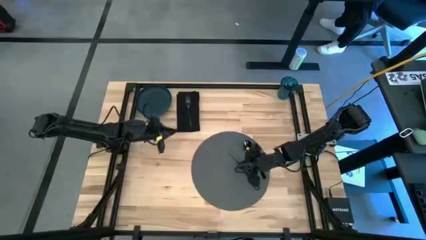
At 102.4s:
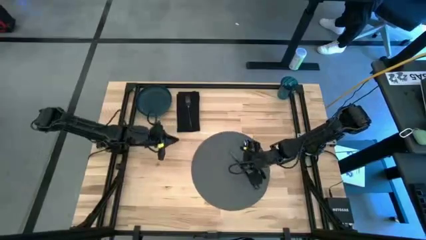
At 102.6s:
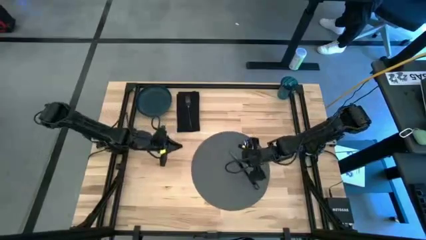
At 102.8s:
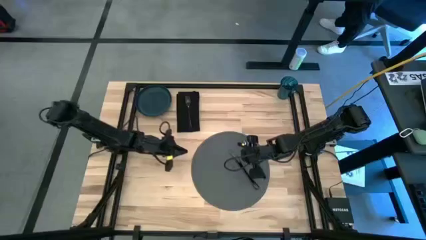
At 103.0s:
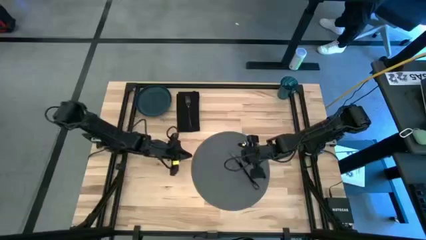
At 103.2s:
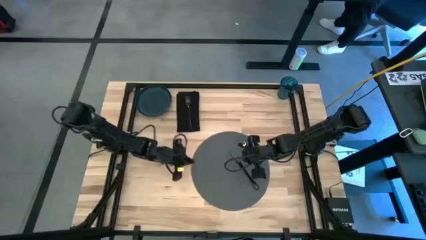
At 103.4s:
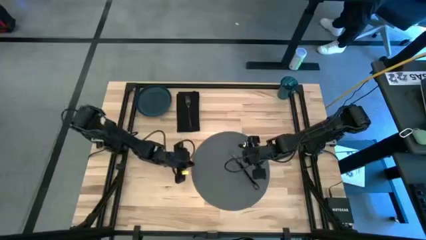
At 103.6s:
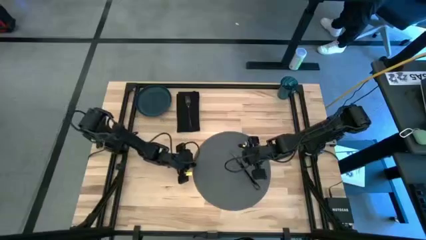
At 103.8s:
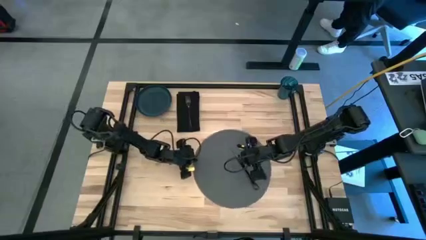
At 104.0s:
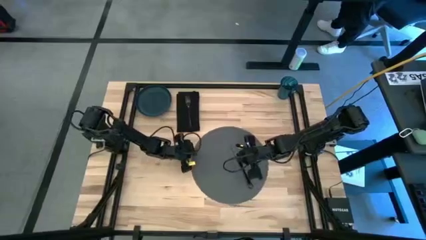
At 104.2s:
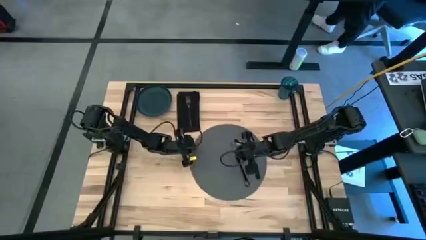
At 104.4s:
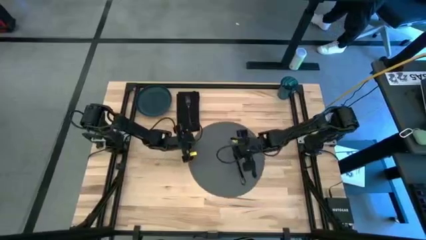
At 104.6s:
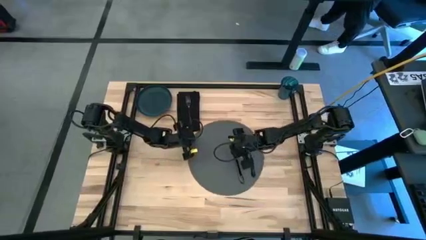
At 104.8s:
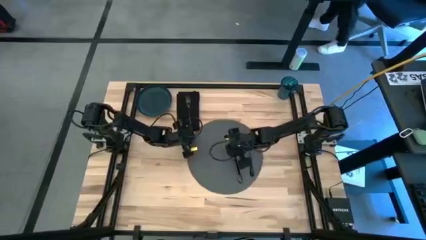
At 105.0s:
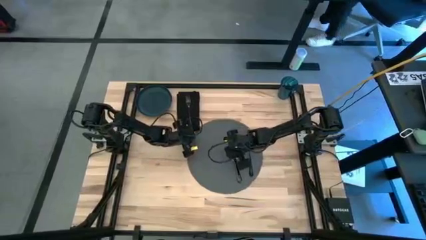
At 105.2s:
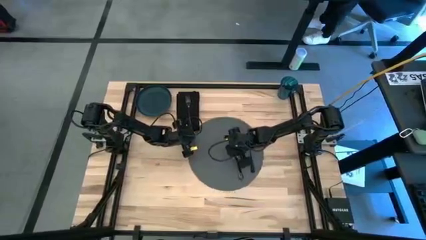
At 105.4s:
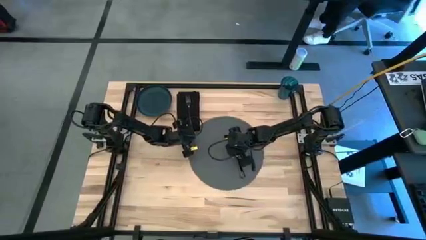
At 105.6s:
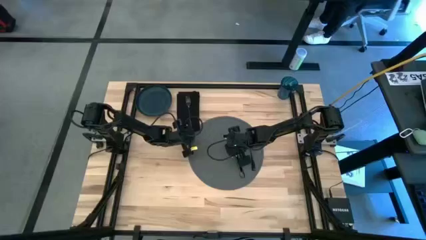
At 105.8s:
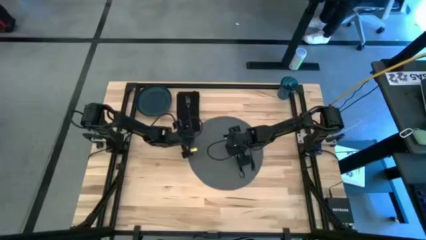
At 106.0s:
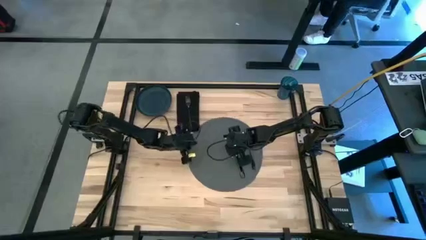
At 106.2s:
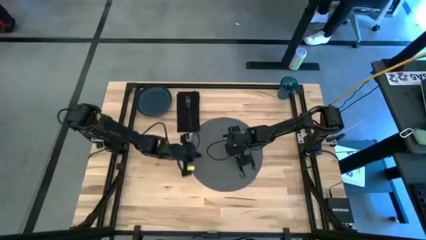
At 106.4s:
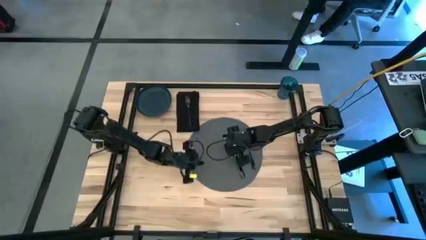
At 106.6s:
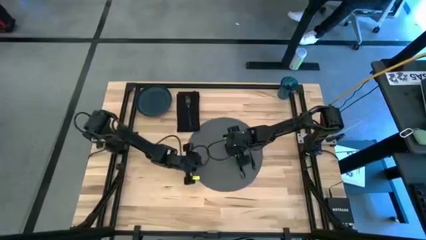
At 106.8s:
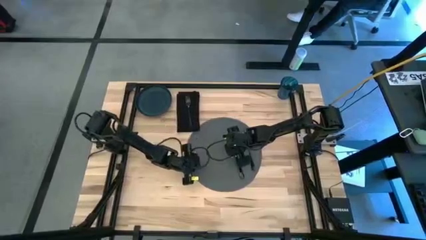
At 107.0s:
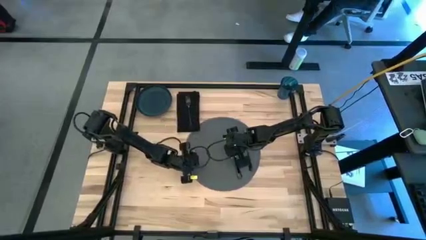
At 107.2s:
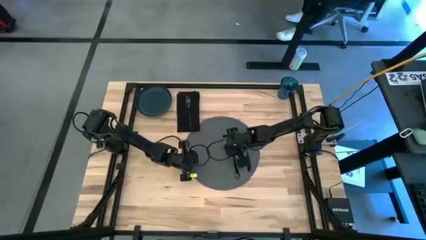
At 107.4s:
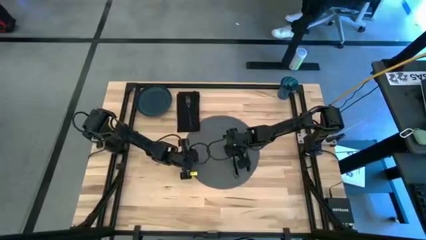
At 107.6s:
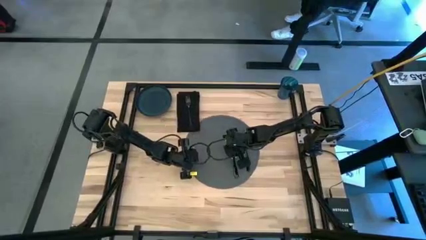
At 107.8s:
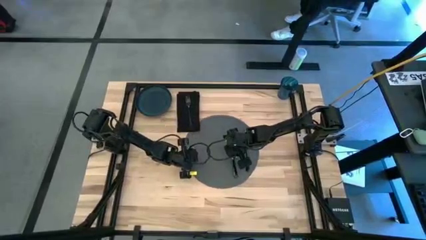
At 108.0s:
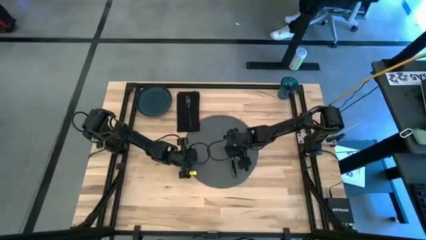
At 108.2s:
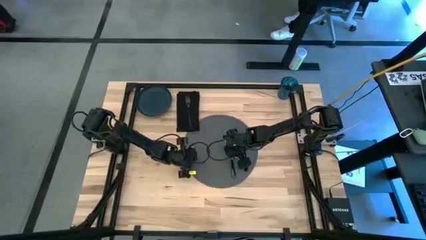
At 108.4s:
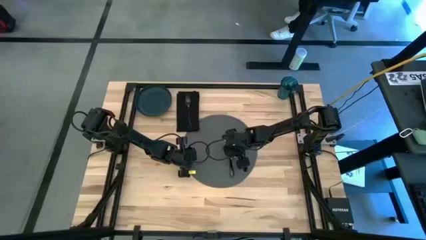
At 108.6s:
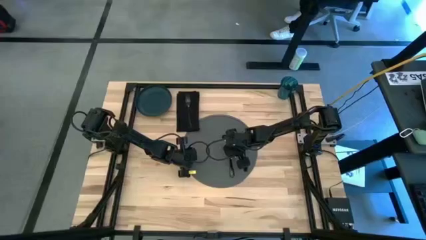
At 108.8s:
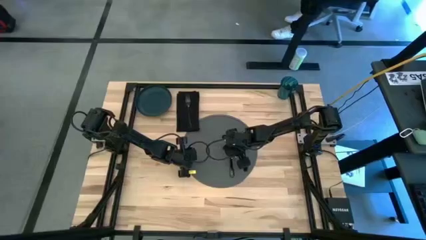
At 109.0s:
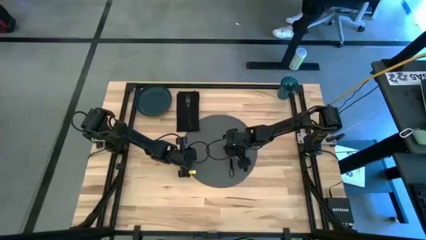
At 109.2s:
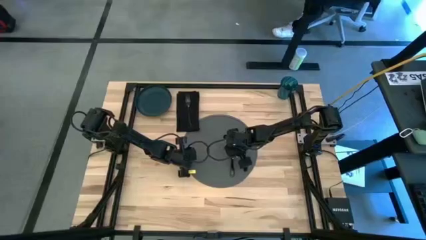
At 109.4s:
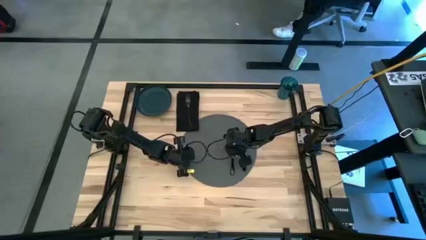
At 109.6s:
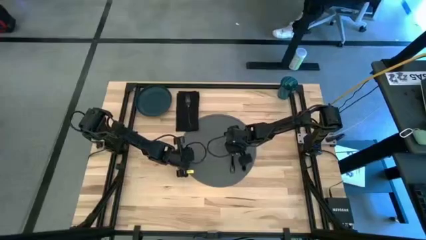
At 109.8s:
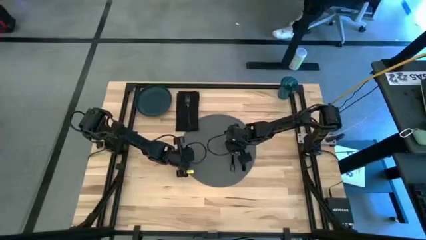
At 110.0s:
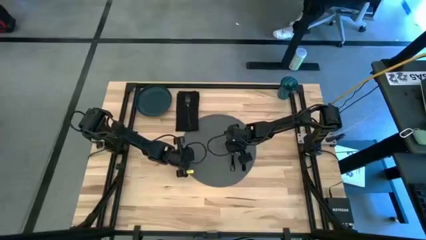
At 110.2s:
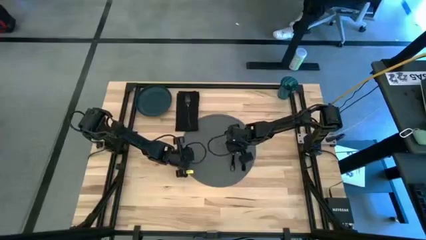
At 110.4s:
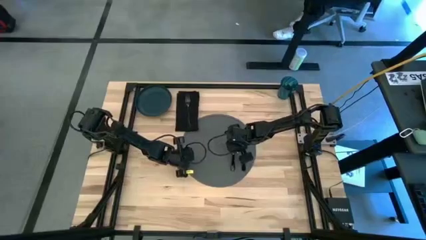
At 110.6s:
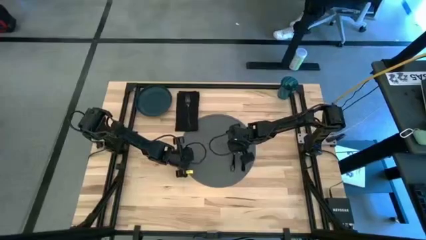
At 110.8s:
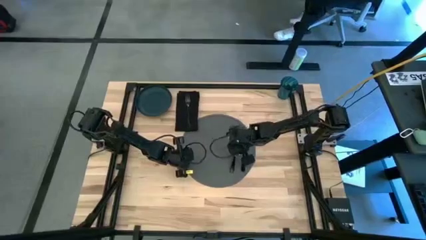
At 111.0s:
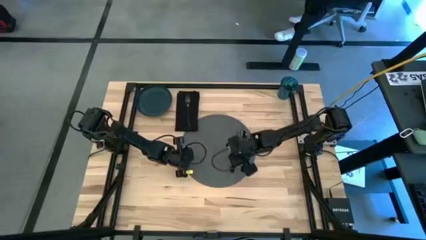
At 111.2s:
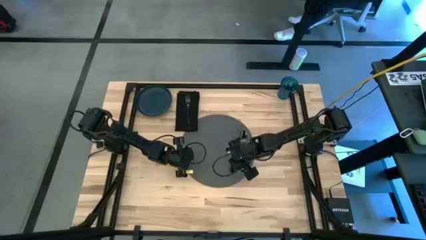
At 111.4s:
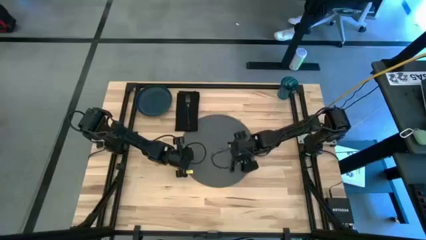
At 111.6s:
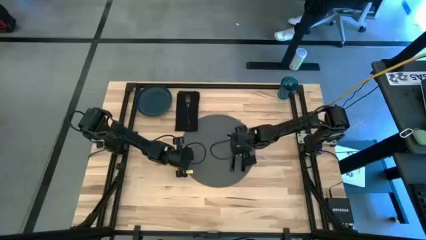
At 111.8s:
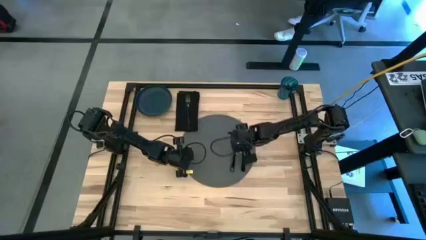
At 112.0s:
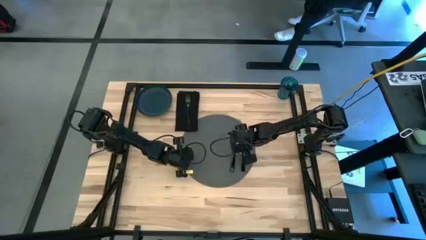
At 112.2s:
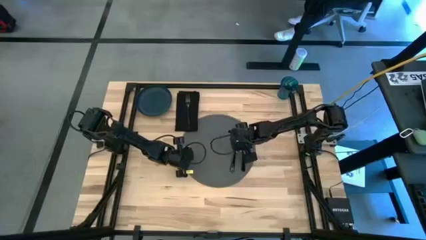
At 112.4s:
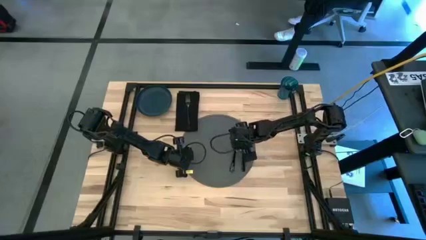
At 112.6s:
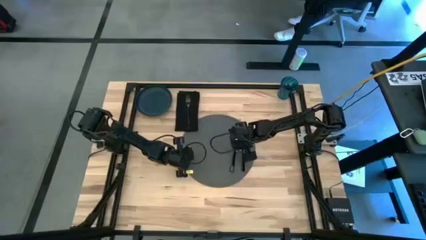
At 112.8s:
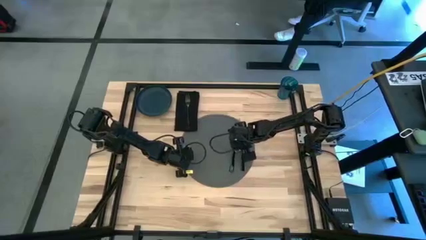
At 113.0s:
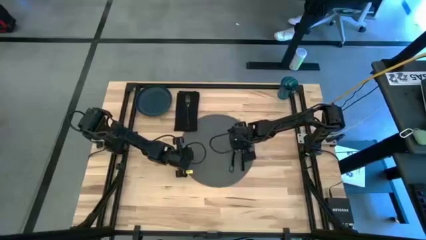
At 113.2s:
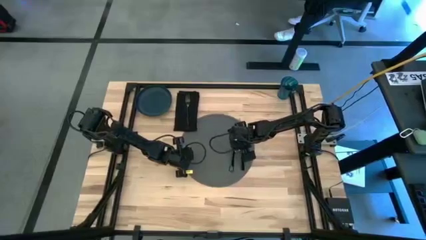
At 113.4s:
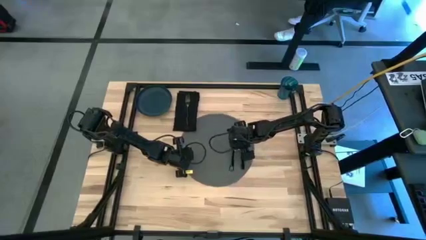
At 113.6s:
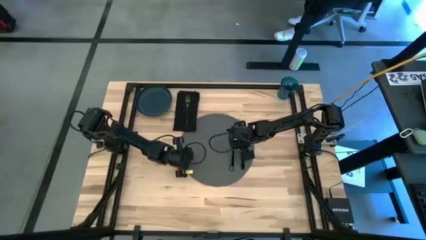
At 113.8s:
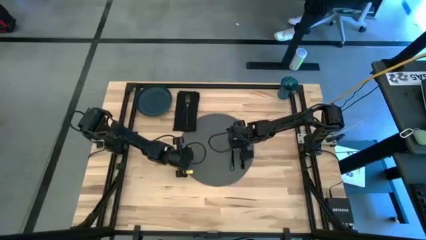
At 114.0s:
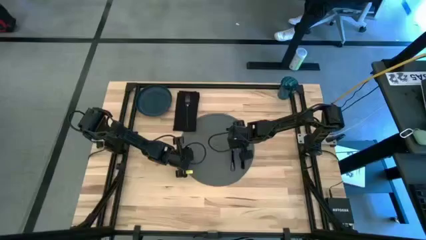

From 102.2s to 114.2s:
Task: Set table place
Put the black table knife on the gray tablemat to the left of the black spoon

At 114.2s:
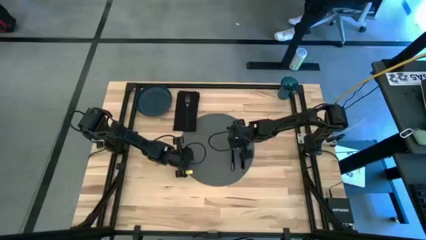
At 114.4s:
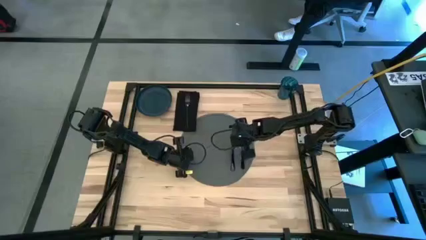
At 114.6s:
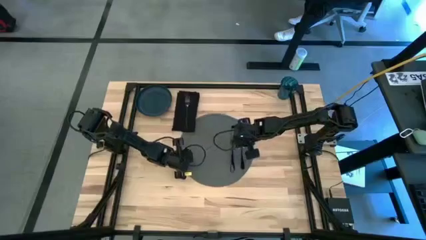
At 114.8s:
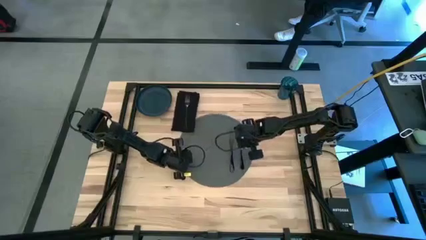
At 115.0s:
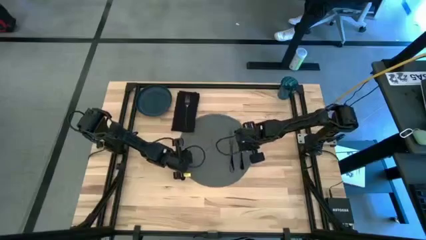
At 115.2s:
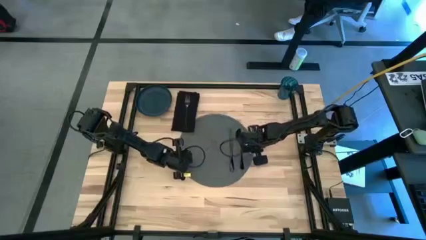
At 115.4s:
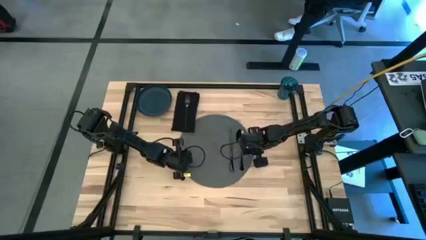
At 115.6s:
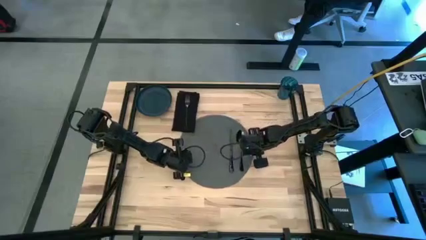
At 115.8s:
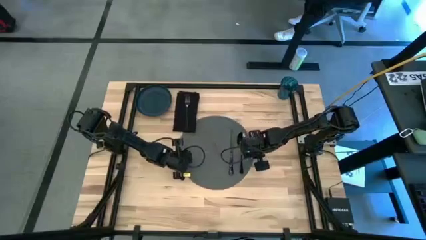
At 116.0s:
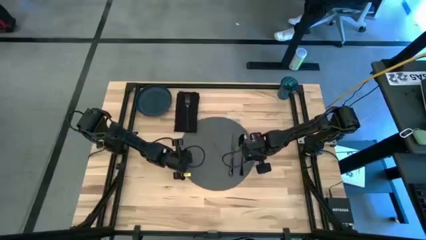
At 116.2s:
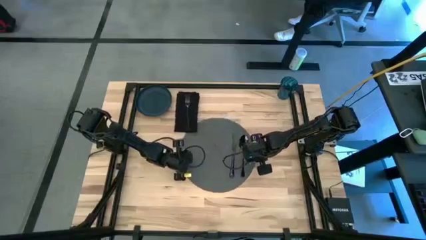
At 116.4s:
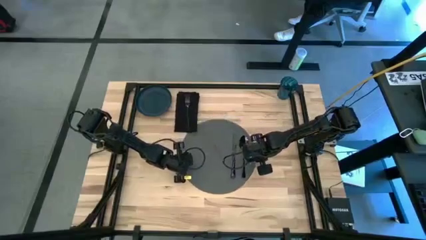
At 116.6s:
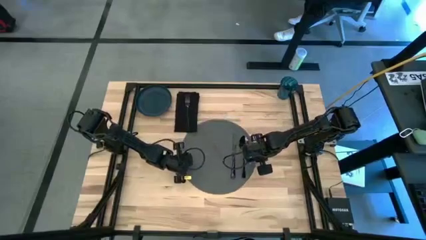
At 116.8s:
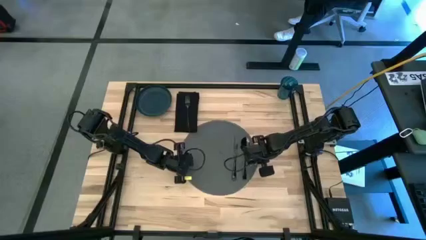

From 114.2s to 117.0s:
Adjust the gray table mat
